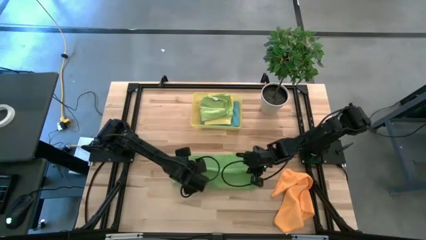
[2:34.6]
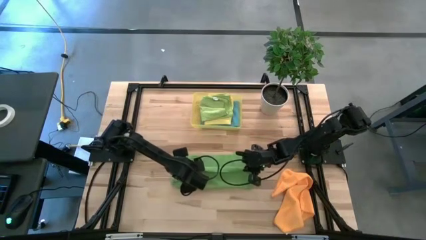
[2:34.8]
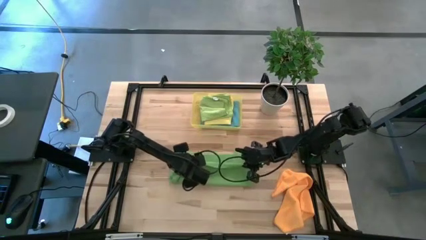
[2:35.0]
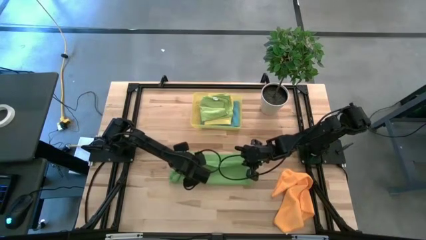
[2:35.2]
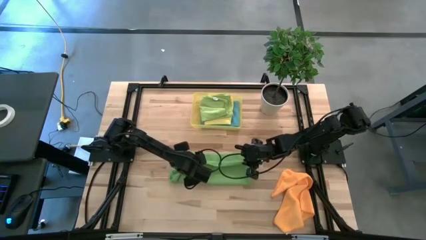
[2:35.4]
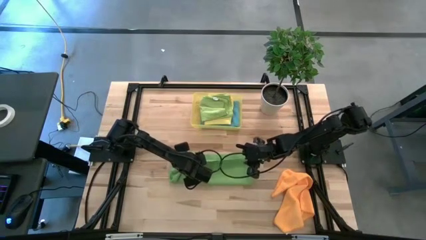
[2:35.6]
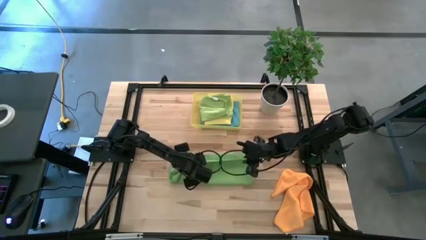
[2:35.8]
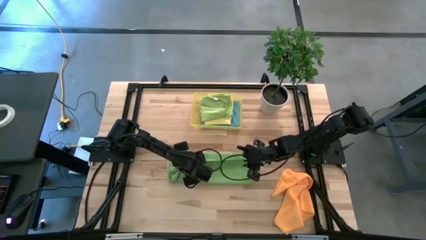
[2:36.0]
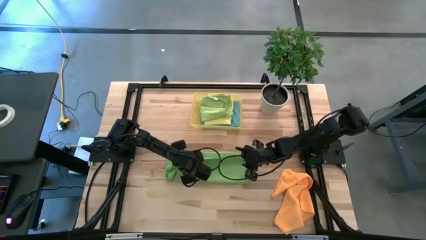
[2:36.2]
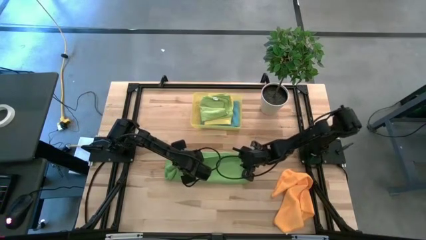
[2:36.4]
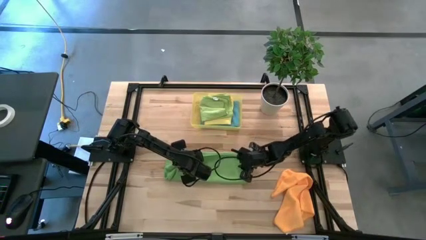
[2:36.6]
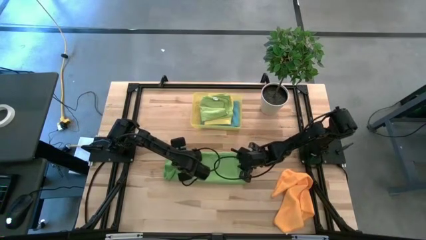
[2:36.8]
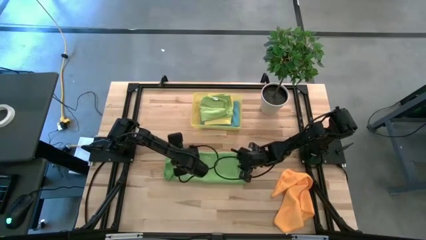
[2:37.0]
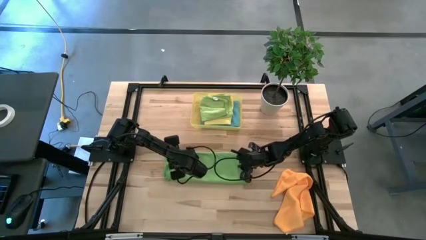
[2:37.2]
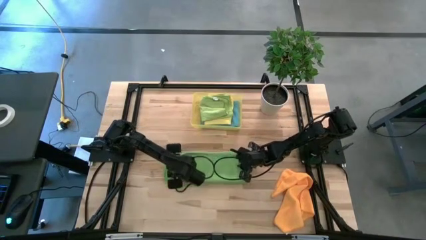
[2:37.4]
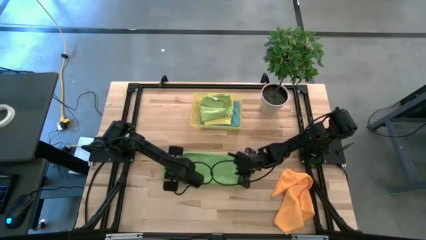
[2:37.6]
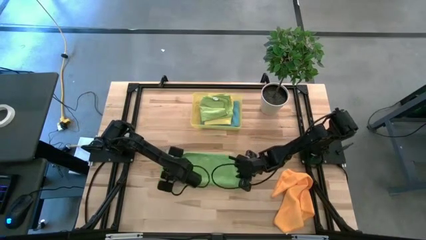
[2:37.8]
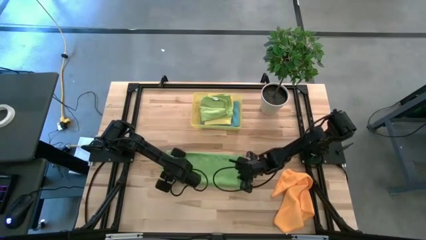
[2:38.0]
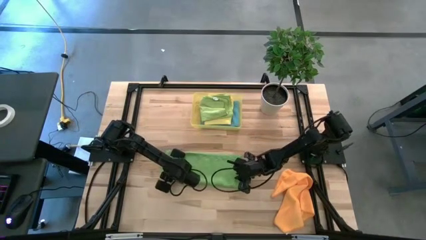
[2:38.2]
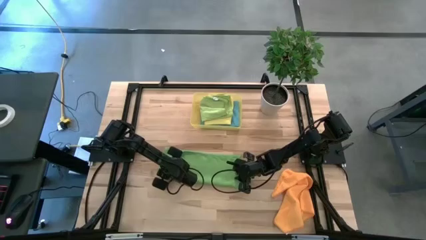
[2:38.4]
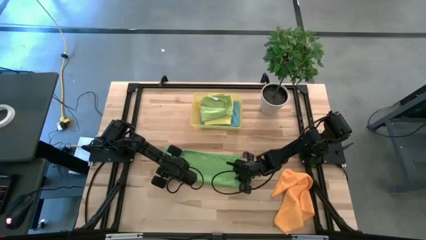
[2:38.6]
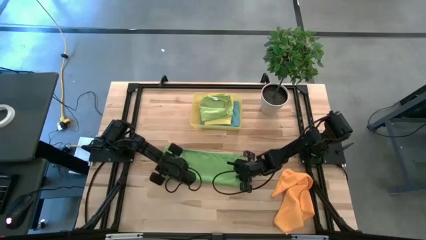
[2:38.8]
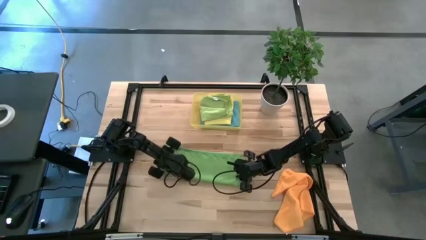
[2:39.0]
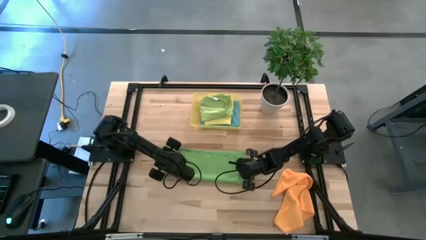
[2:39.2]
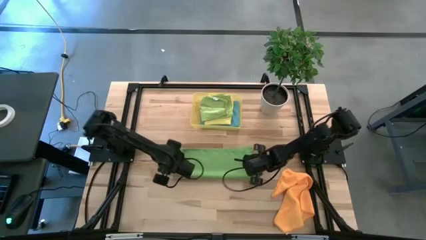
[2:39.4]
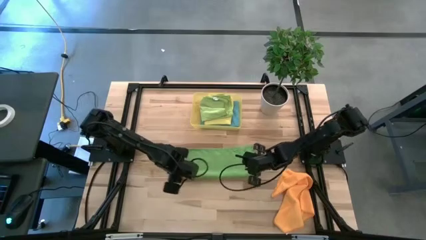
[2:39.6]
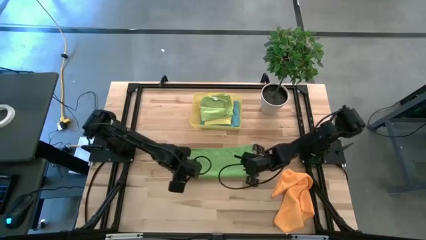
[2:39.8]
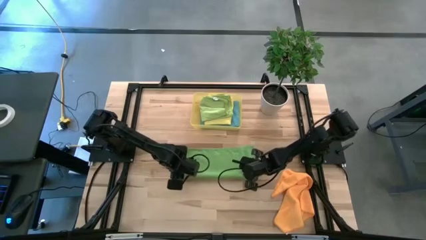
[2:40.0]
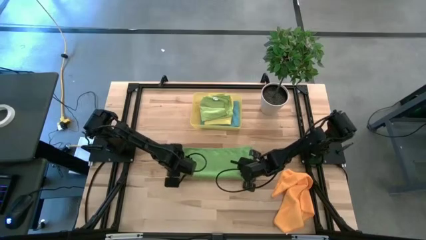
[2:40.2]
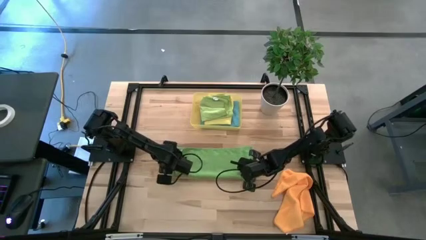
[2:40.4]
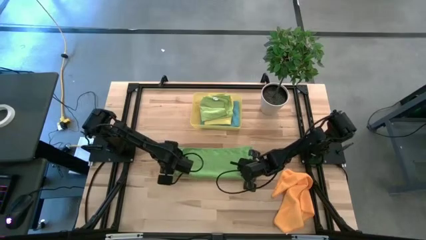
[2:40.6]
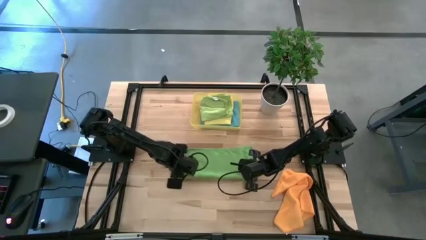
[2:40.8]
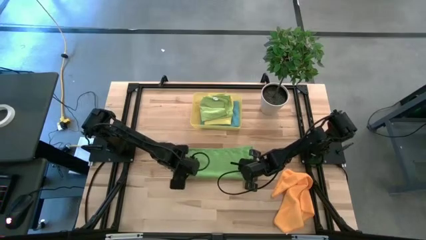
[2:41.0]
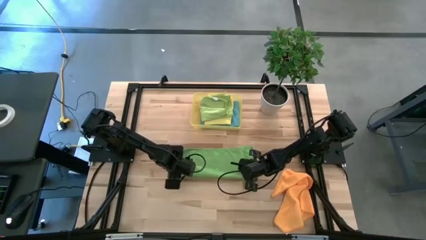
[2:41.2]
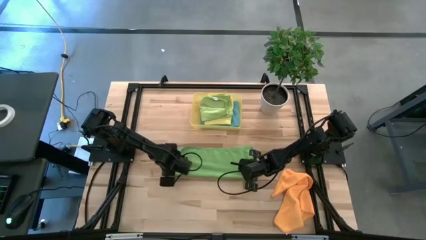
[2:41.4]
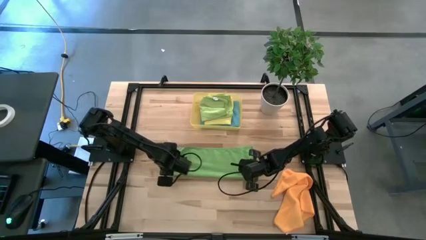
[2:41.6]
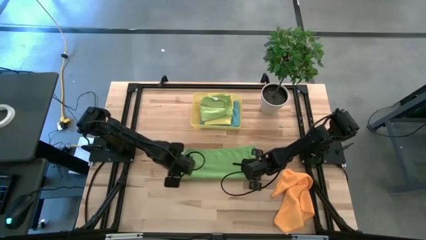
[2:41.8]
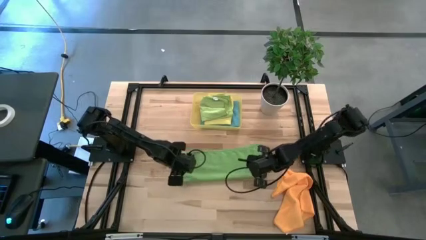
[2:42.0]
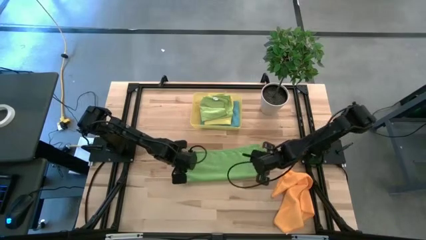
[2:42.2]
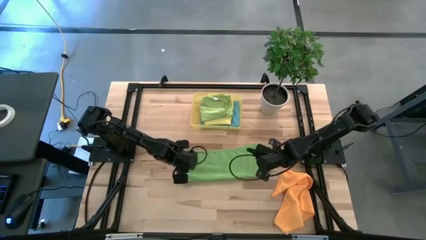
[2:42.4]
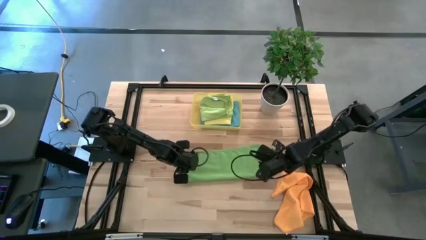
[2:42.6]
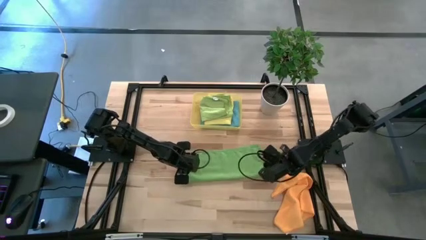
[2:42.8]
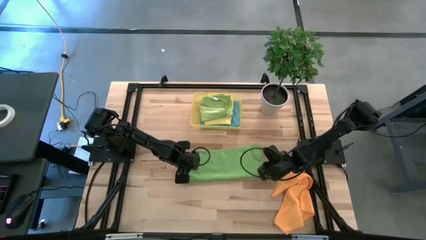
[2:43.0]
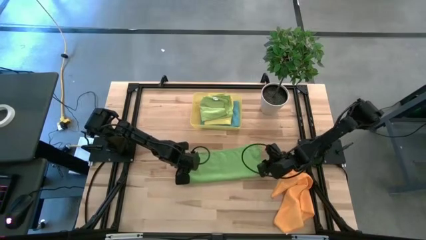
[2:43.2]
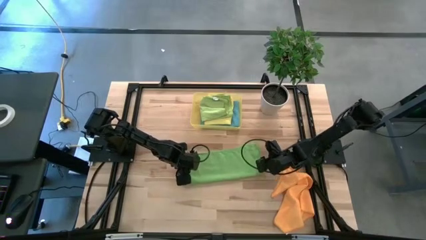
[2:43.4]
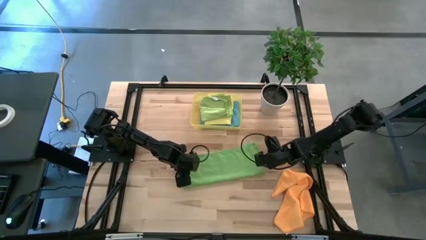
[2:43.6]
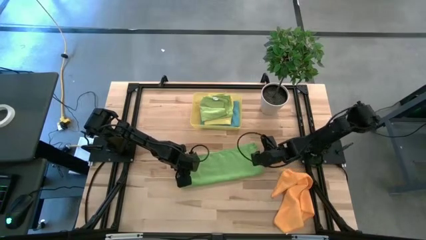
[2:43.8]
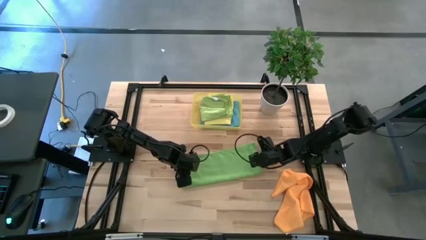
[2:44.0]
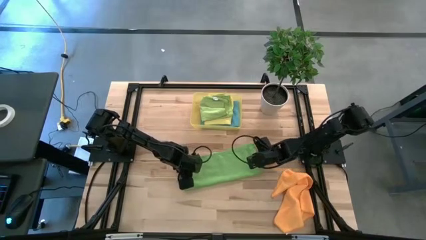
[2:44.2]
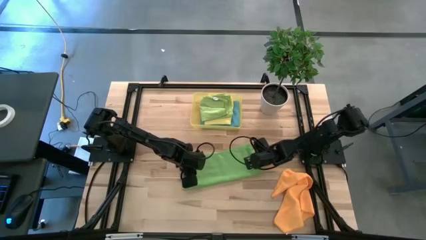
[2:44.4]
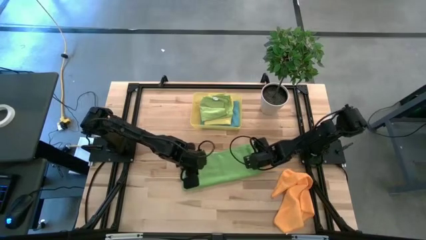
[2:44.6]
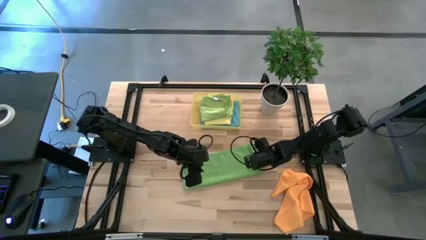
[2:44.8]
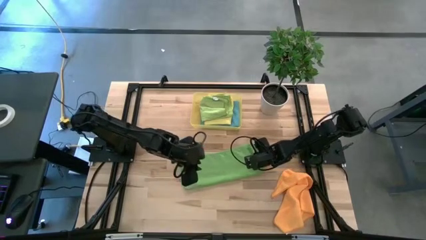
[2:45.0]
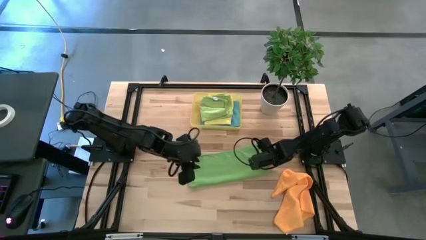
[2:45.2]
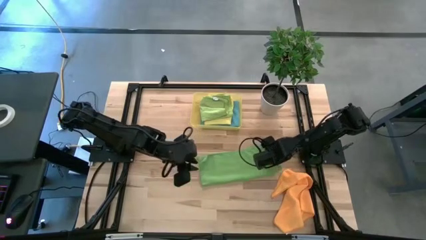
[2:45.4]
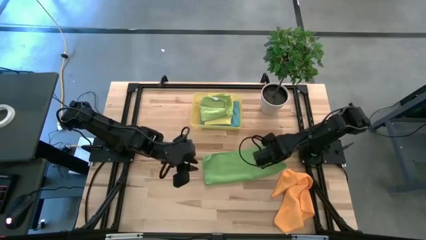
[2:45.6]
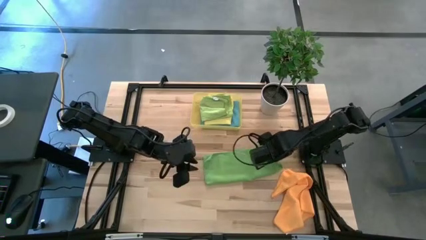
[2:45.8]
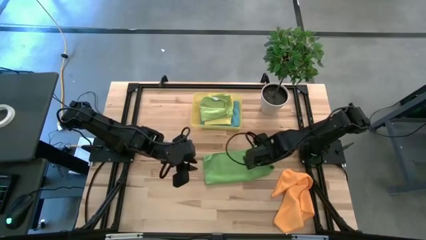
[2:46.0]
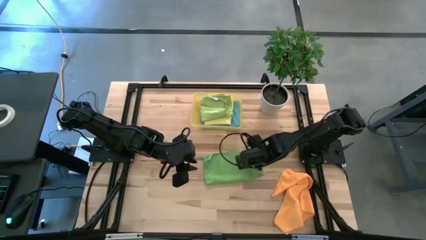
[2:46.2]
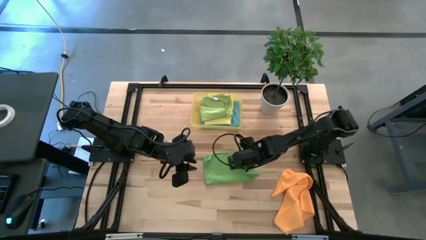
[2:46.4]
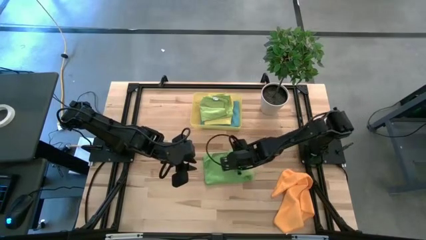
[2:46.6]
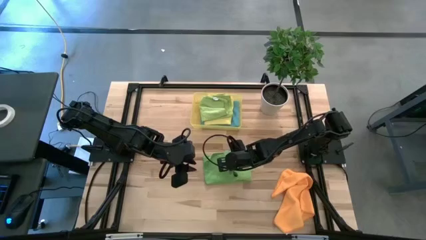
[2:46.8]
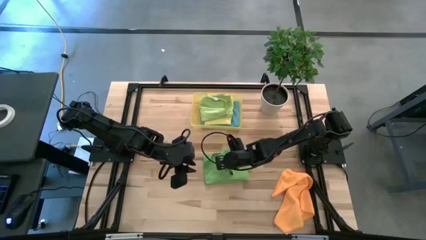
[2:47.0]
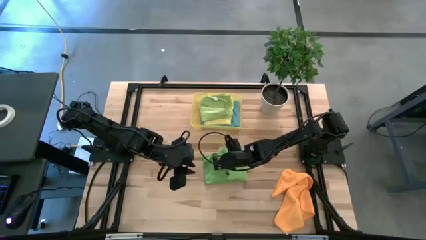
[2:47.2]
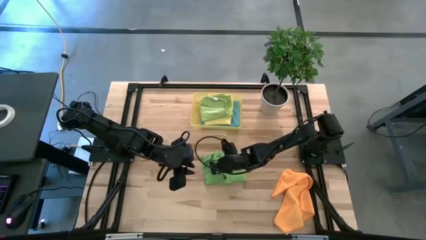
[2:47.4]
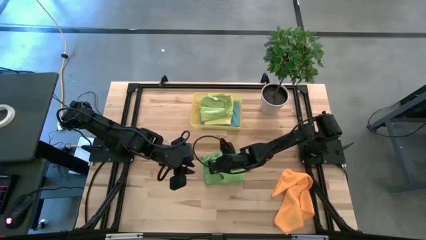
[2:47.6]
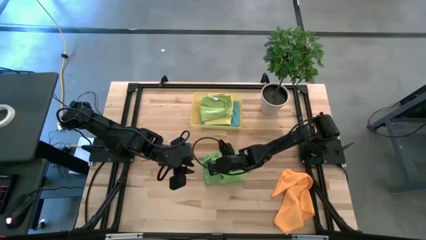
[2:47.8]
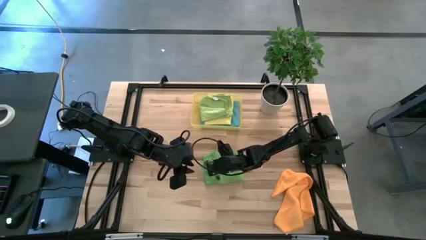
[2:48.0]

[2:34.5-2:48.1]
Task: Fold microfiber towels
Fold the green microfiber cloth
